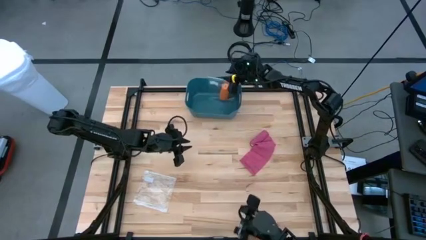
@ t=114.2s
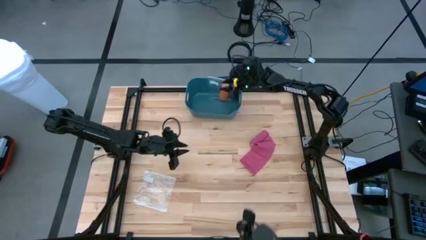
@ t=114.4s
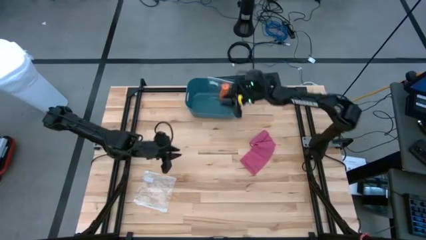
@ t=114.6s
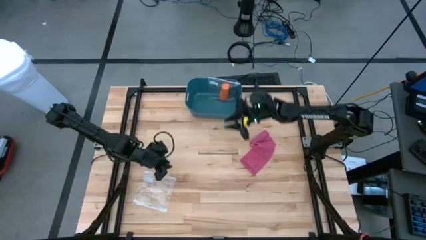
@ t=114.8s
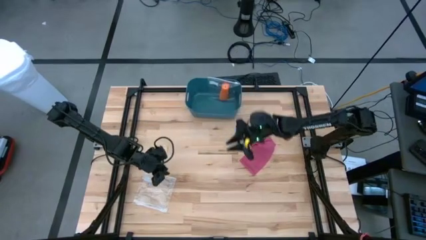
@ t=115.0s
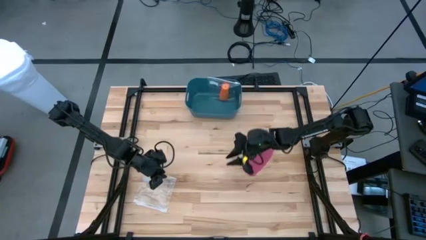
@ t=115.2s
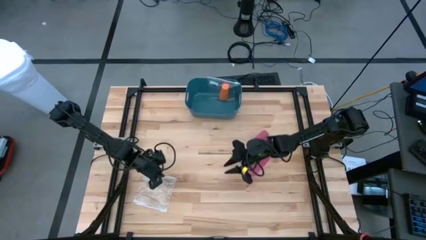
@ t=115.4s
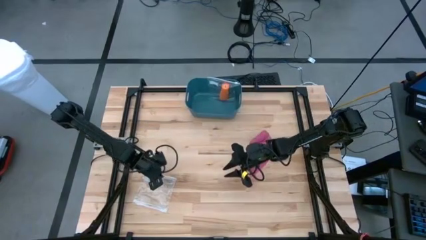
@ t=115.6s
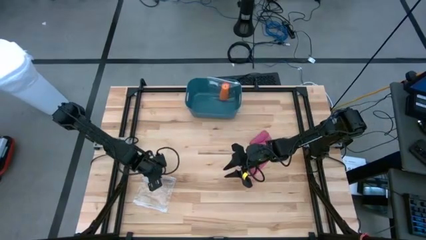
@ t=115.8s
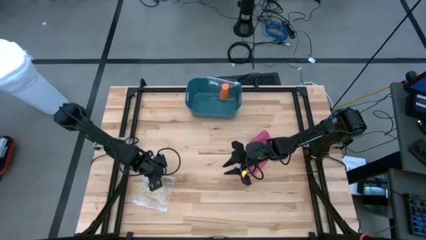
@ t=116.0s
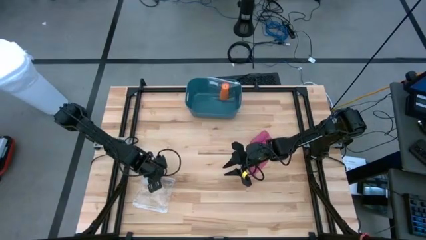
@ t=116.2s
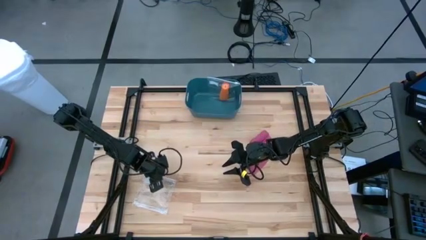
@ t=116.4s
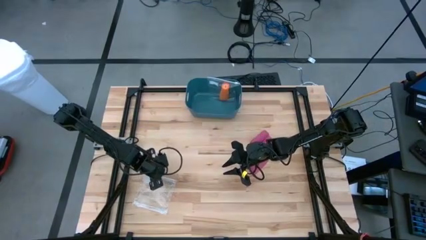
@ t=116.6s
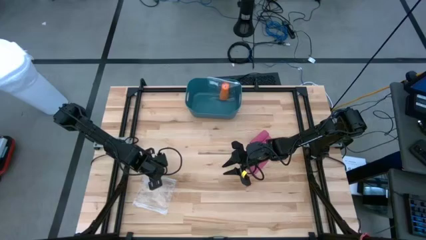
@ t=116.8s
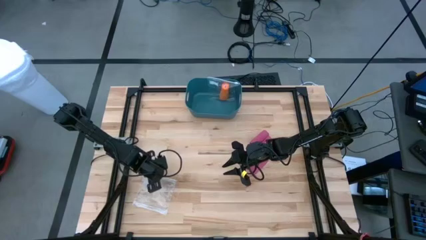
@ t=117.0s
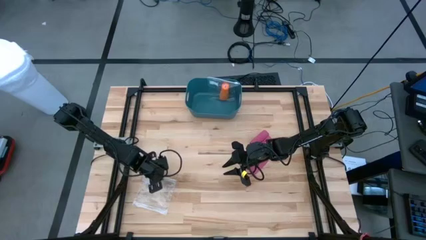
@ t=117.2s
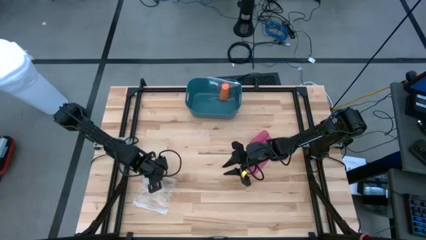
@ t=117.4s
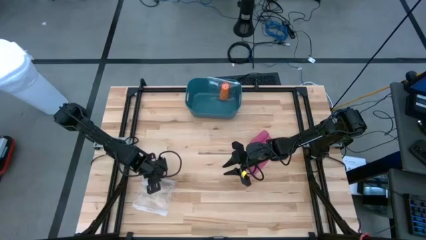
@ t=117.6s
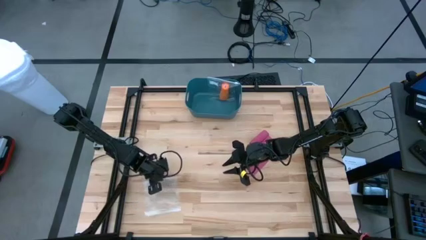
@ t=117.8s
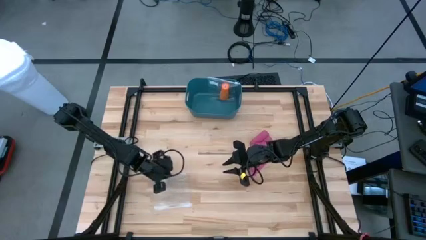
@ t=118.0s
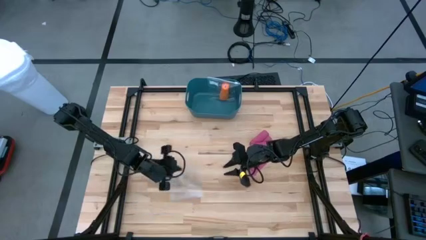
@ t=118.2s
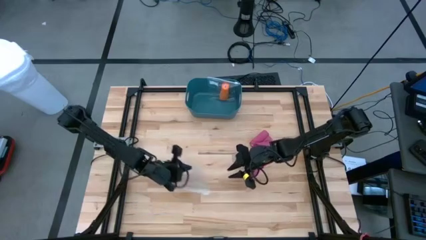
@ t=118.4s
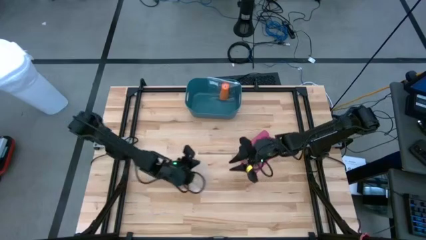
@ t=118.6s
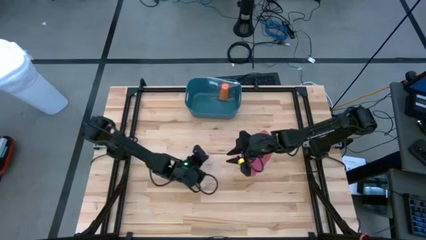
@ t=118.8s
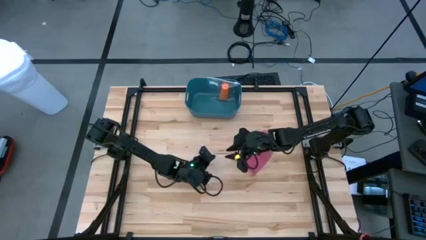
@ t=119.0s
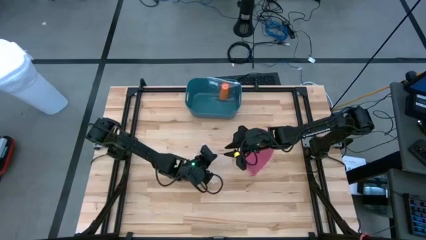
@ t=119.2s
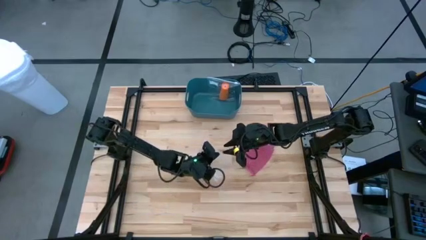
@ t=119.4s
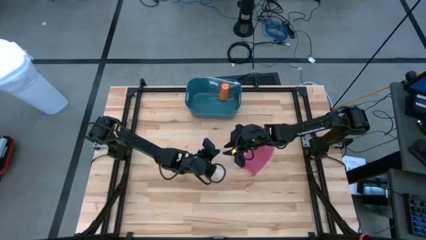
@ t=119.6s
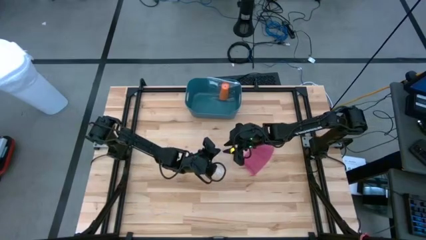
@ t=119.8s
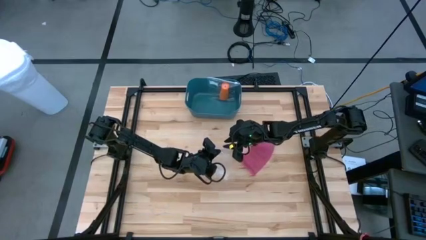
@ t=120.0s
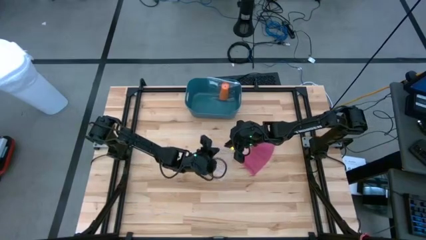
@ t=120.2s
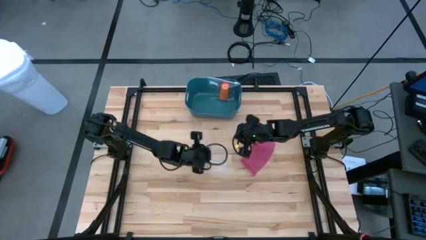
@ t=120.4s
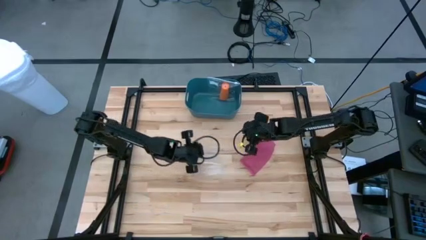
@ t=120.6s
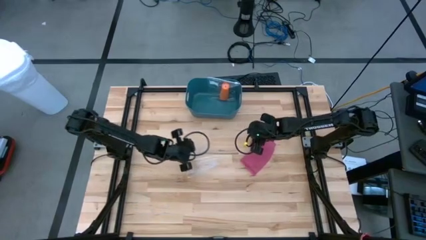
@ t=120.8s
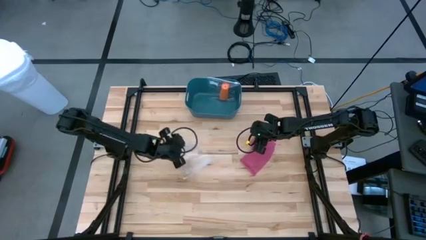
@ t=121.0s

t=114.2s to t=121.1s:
Task: Roll bandage
Move the transparent zip lock to the center of the table
